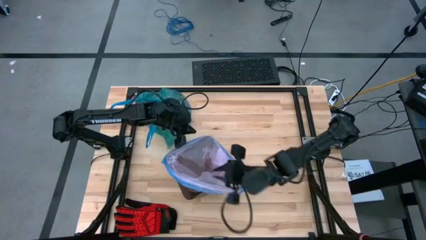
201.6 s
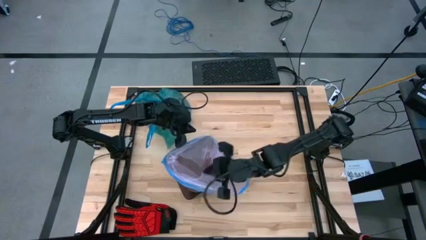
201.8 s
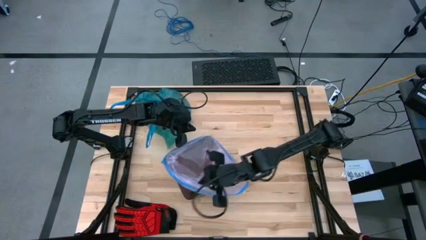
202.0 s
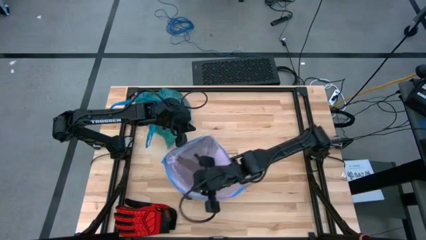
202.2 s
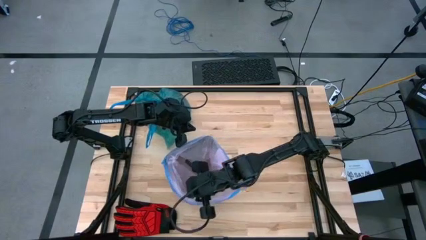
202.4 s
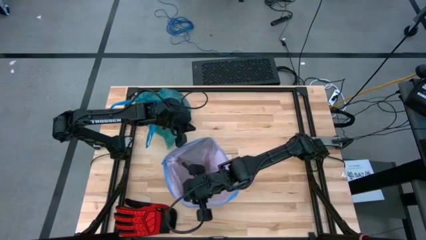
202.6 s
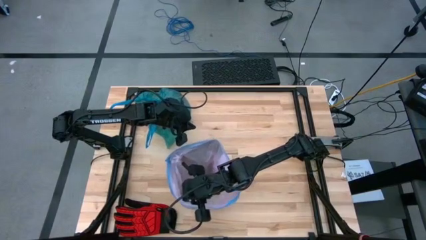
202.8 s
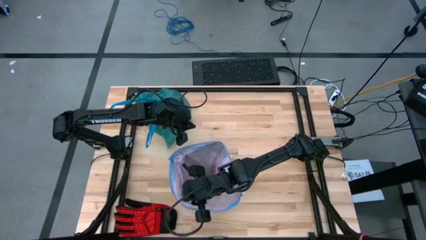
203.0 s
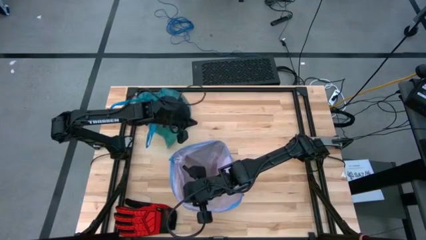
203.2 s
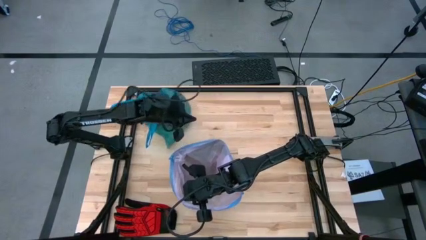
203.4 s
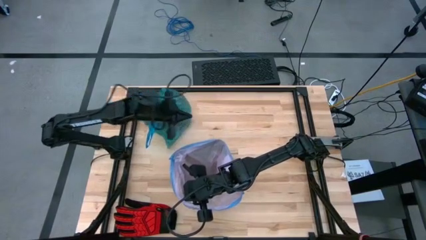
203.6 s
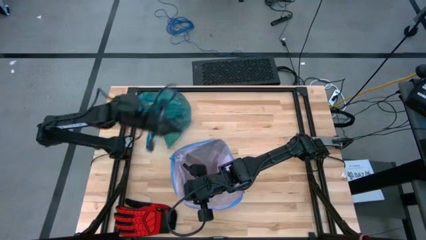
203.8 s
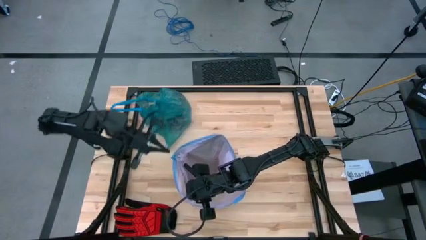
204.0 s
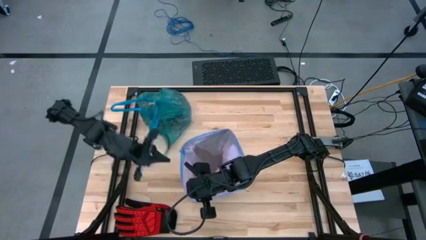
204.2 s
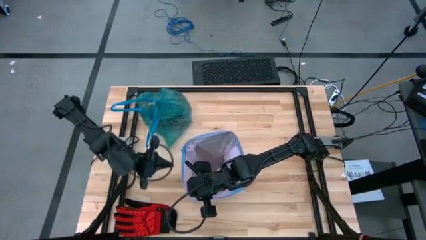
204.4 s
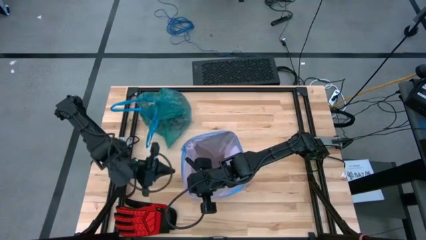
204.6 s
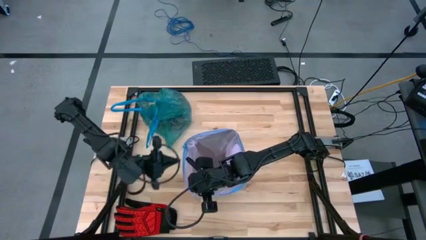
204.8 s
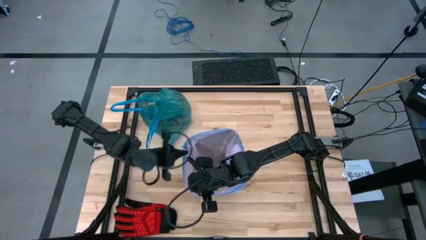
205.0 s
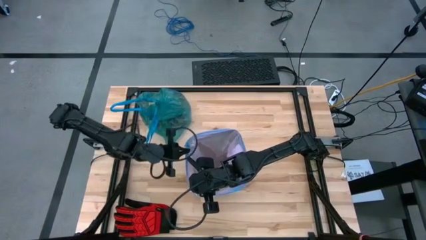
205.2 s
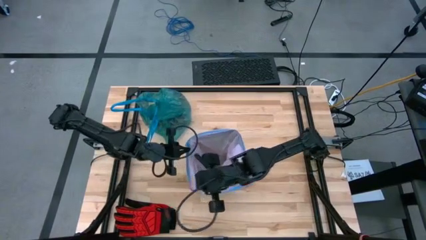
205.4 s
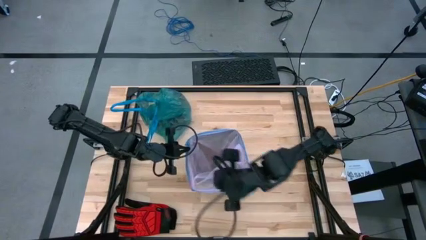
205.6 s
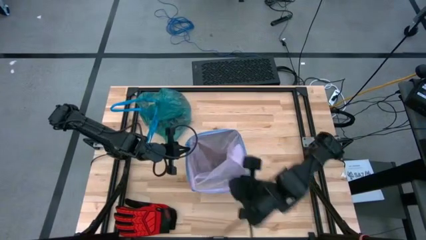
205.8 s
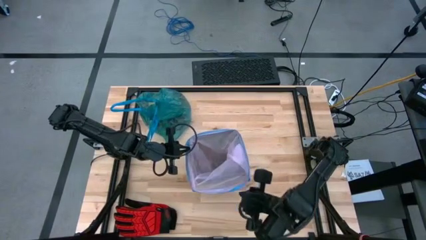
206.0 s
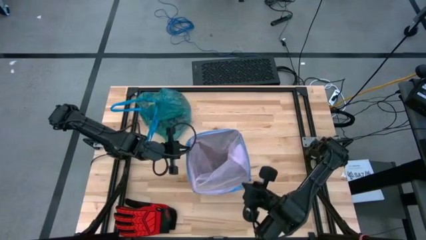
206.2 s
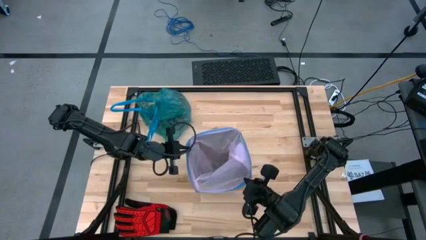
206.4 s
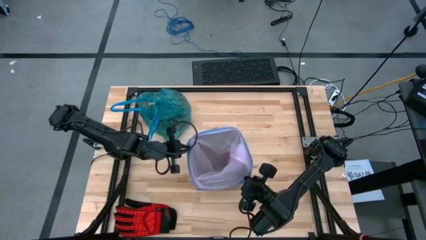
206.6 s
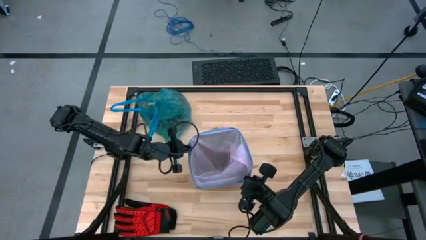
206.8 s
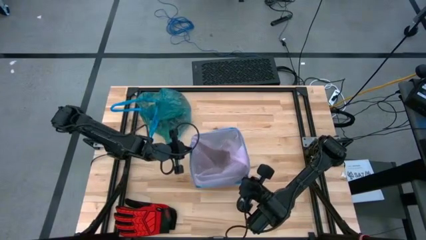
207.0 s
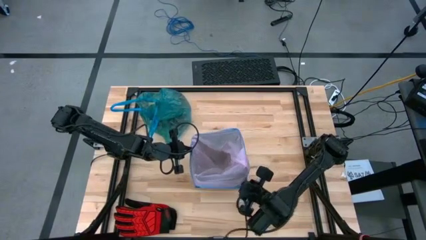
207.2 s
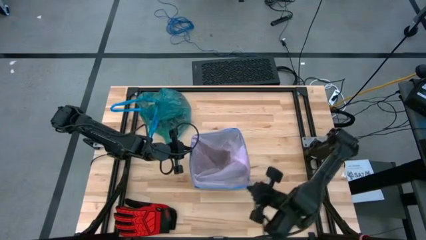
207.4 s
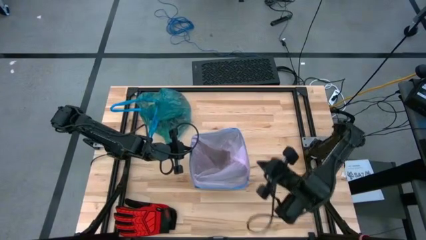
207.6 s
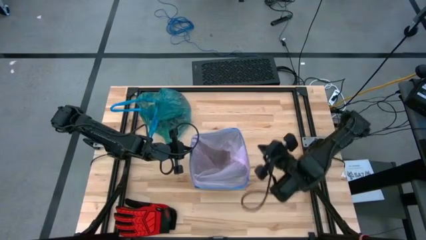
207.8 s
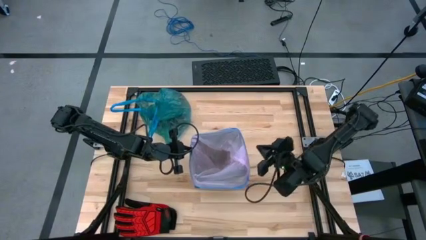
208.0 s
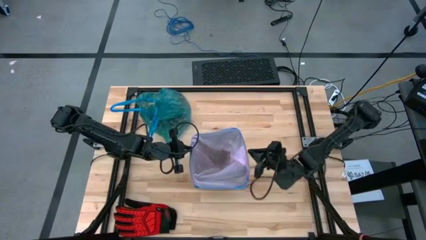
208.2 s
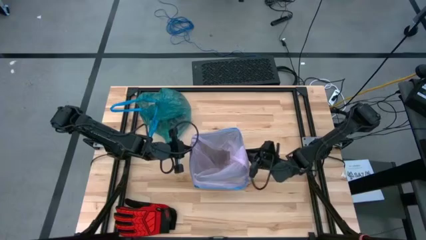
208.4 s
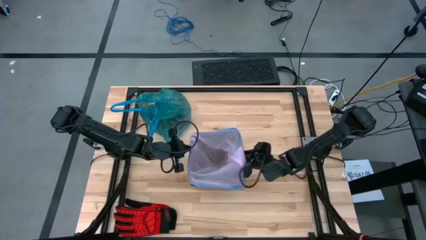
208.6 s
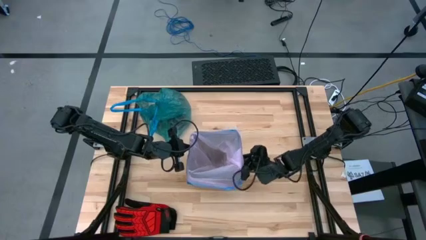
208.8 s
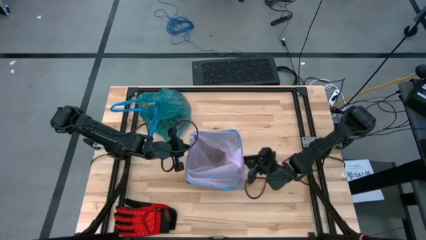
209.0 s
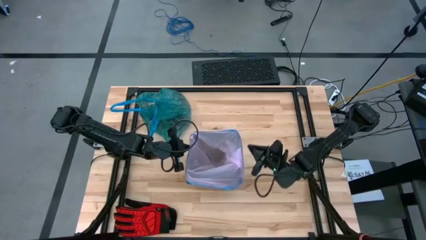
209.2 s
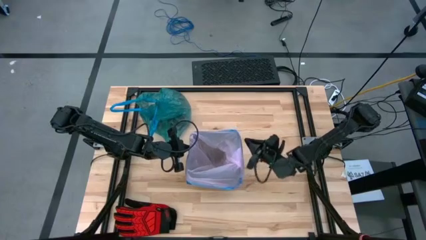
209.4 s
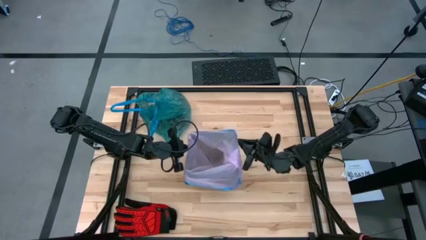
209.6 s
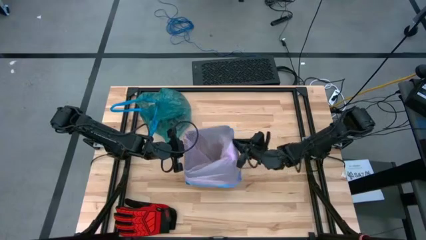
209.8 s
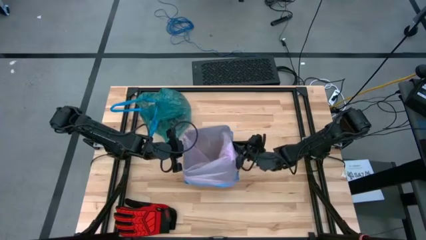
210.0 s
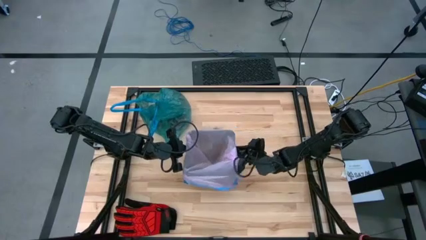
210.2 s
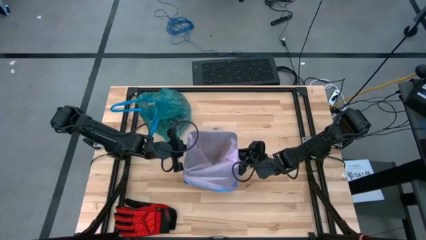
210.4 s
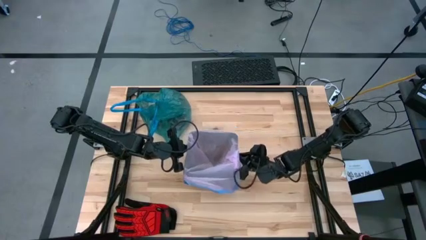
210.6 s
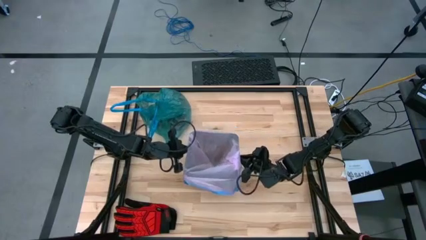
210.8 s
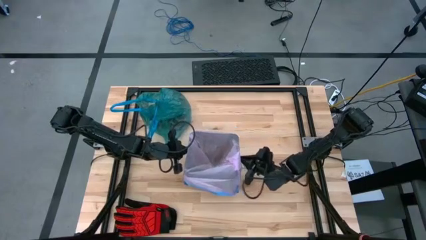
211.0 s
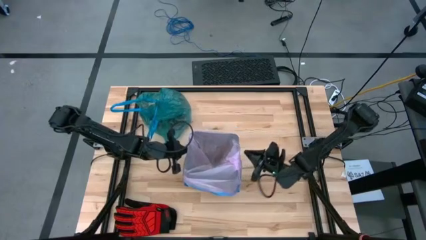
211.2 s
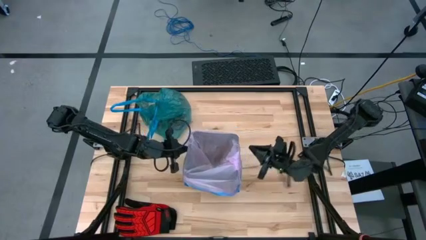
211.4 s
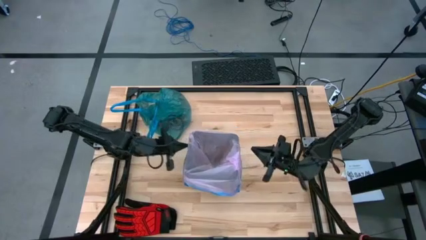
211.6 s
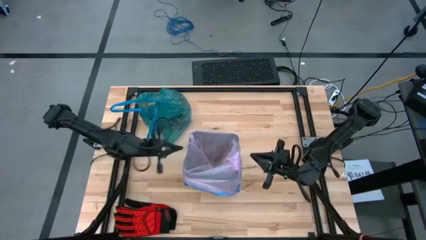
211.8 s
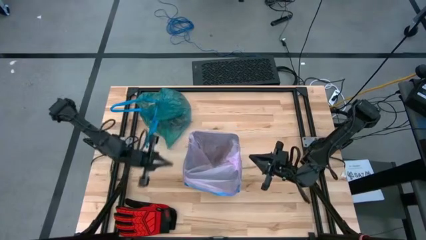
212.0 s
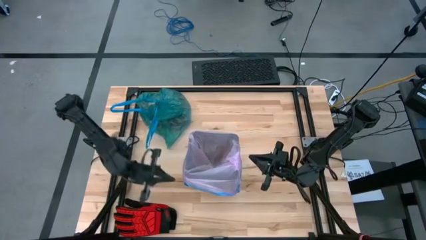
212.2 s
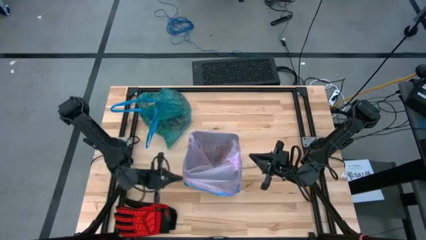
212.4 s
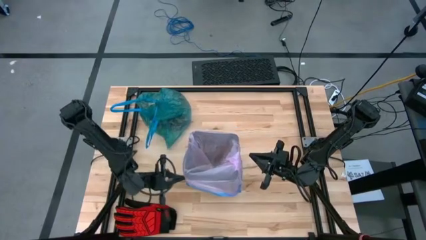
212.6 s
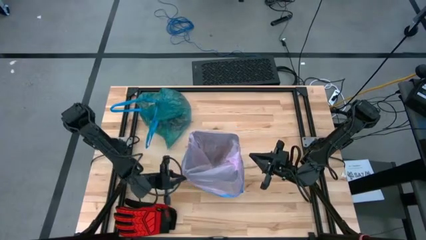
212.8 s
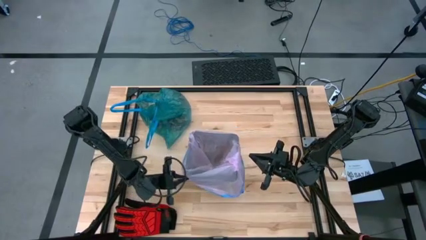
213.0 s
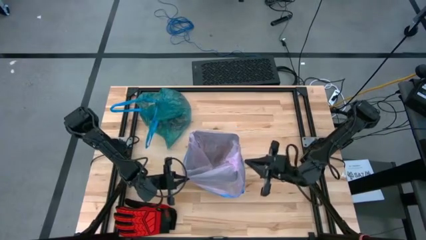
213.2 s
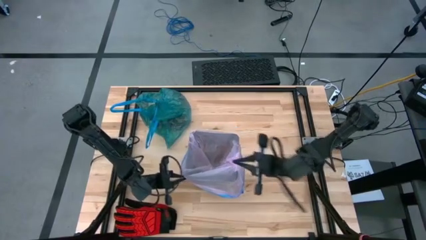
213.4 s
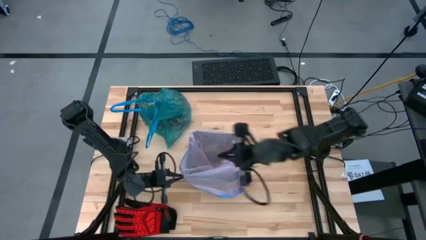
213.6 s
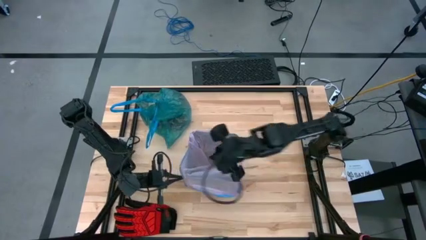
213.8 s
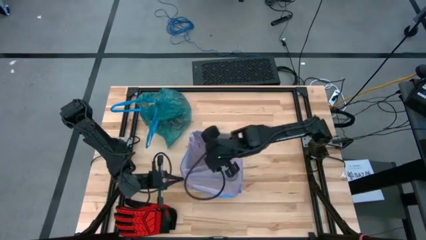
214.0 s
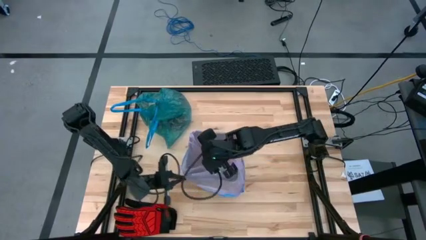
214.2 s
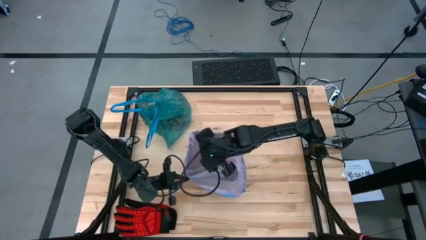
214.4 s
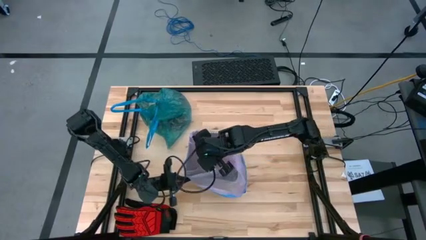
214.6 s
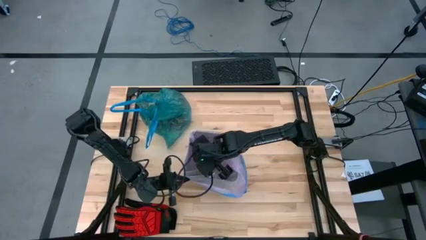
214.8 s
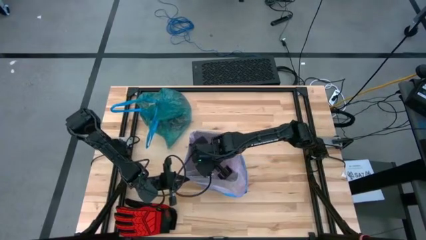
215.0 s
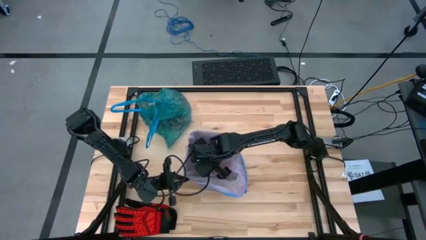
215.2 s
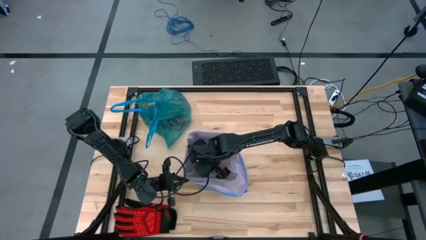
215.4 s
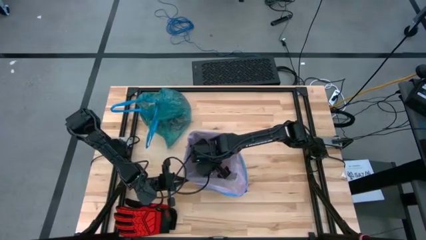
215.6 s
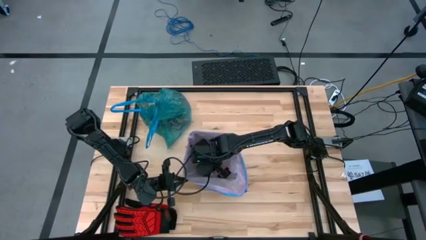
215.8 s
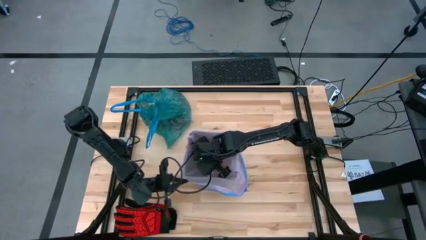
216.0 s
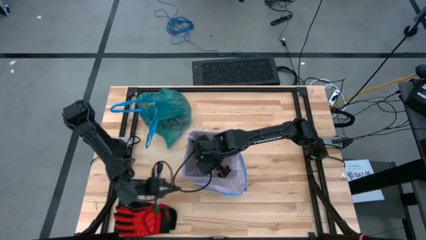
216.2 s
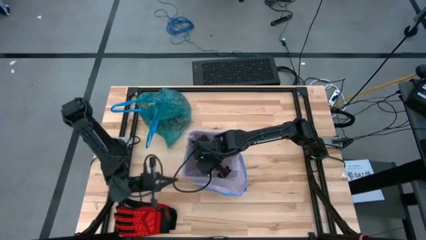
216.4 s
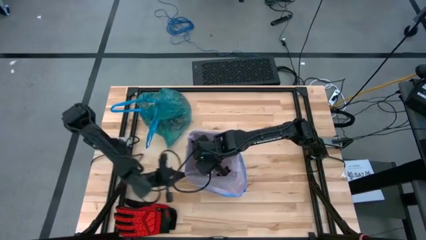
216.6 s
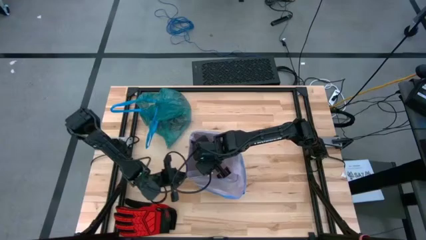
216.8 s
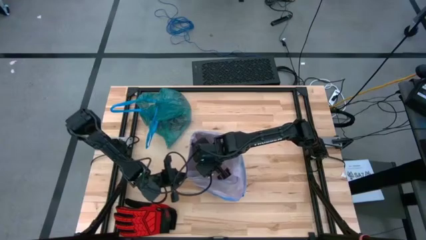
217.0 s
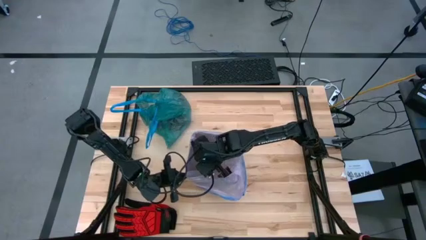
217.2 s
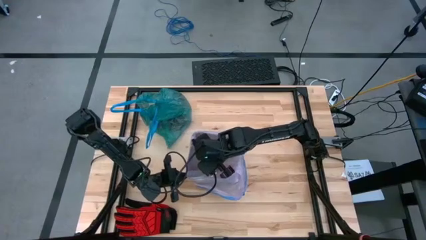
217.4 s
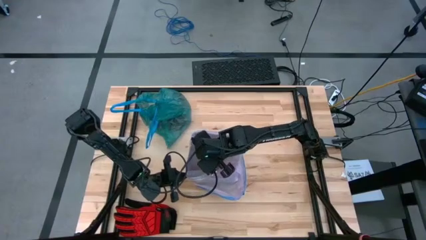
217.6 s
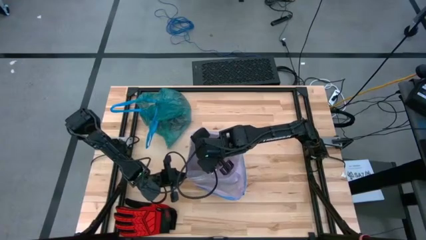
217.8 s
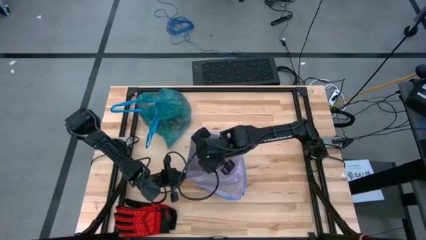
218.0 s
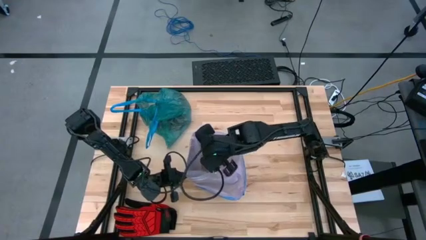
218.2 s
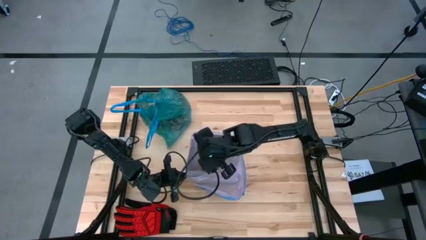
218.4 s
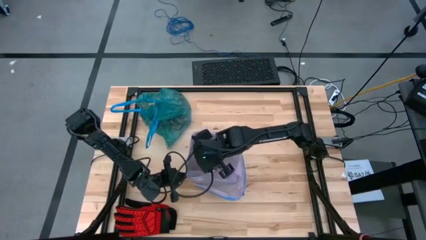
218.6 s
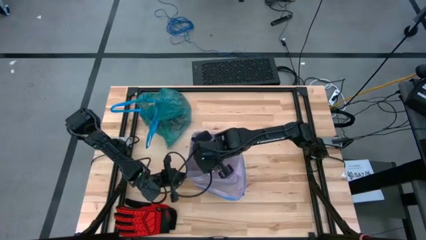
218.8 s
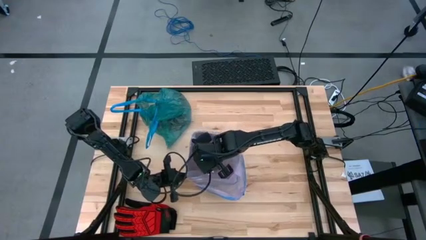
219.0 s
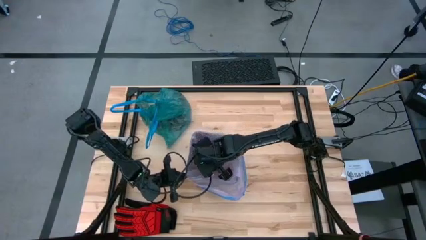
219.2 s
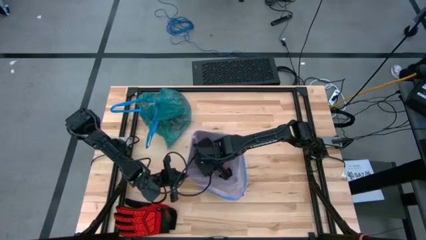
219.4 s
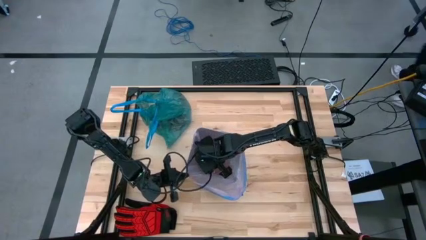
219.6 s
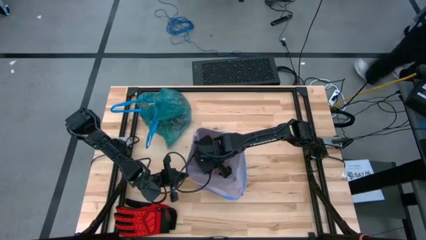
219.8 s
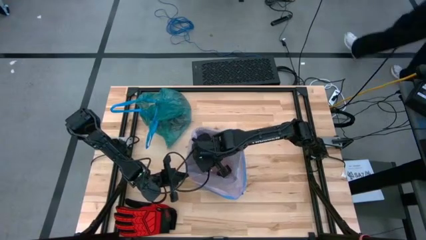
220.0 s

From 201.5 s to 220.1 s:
Task: place trash/remove bag and relplace
Insert the trash bag into the trash bin
